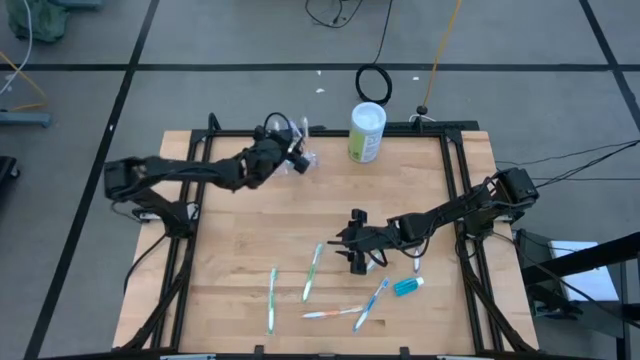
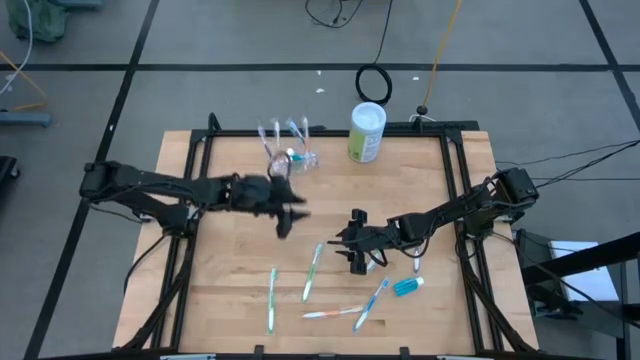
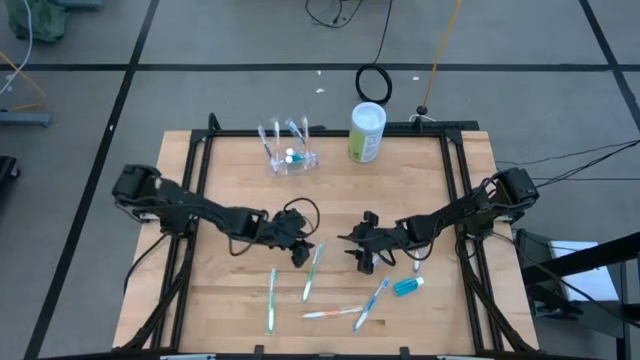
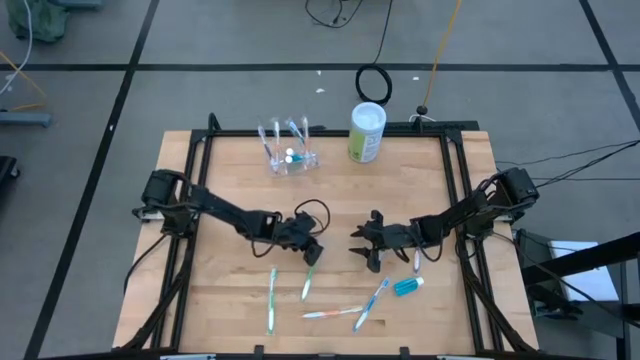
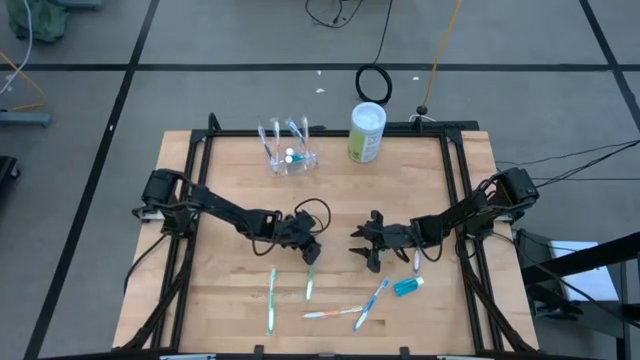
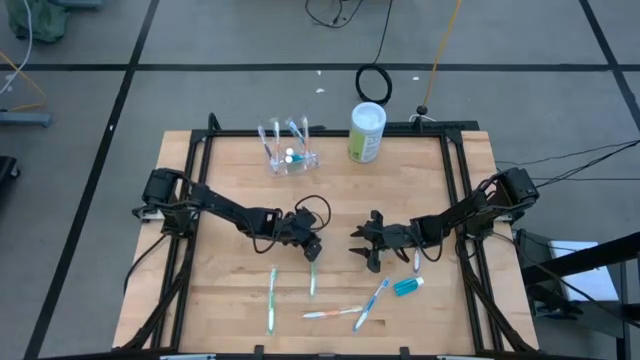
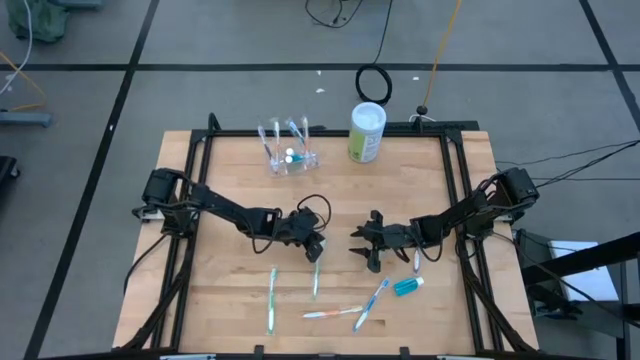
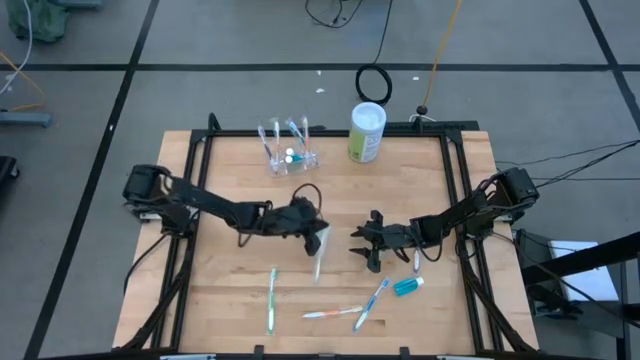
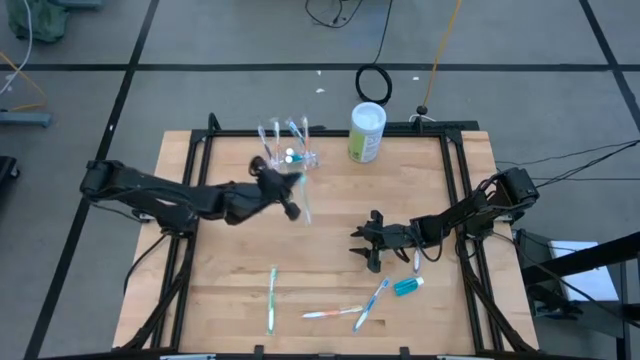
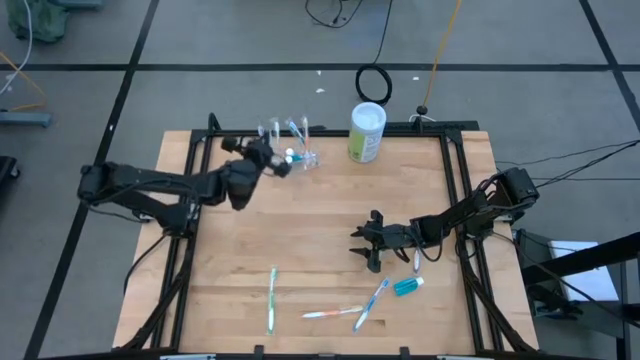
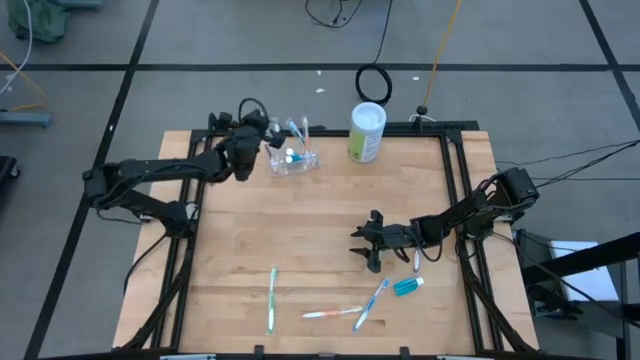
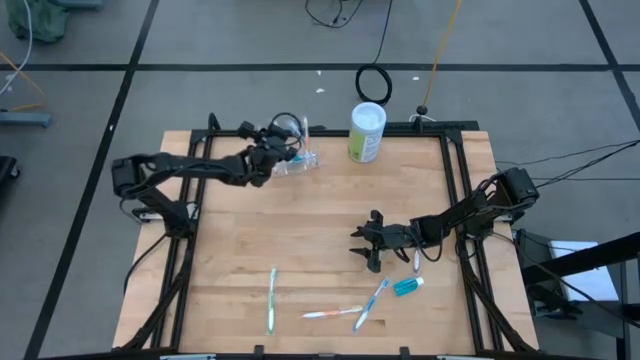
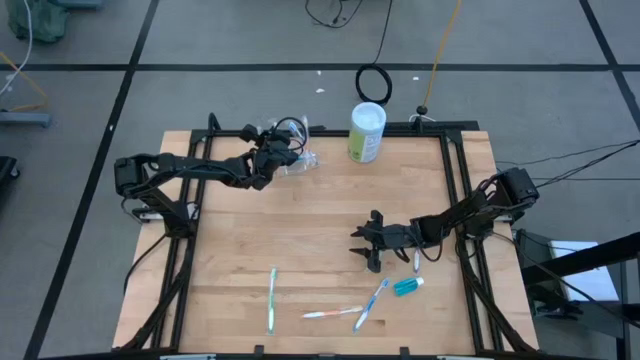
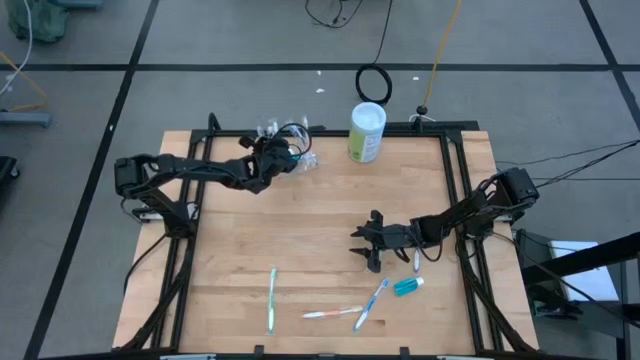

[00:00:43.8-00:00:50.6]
Task: Pick & Place toothbrushing station
Put the middle green toothbrush into the transparent organizer

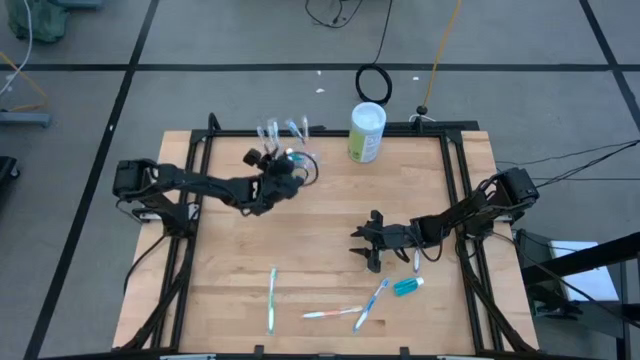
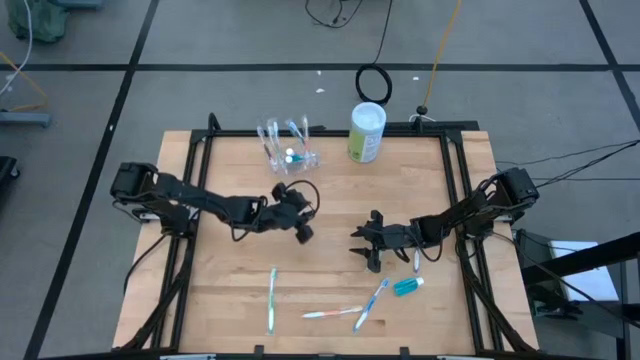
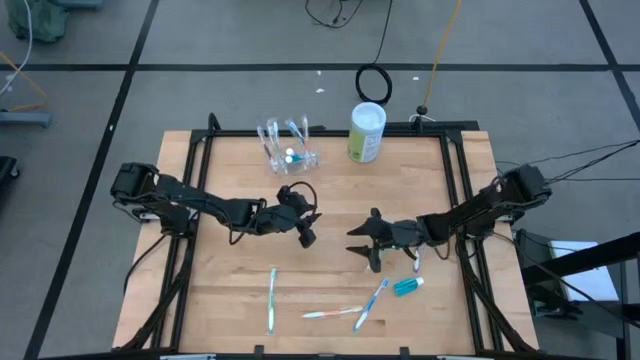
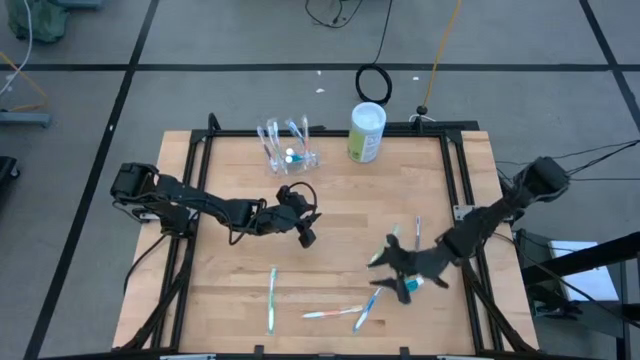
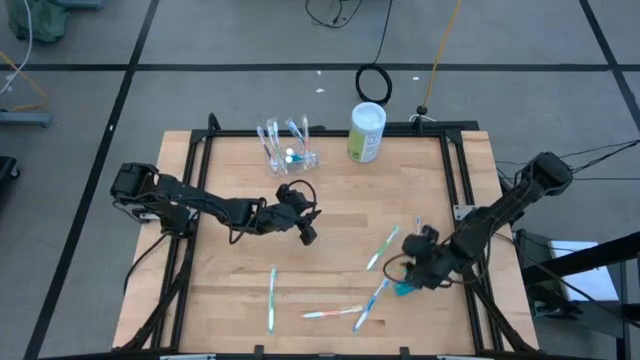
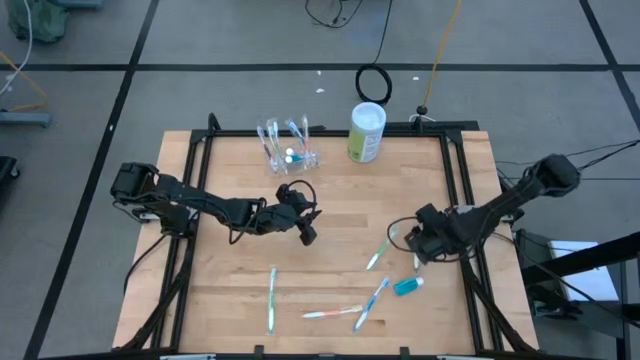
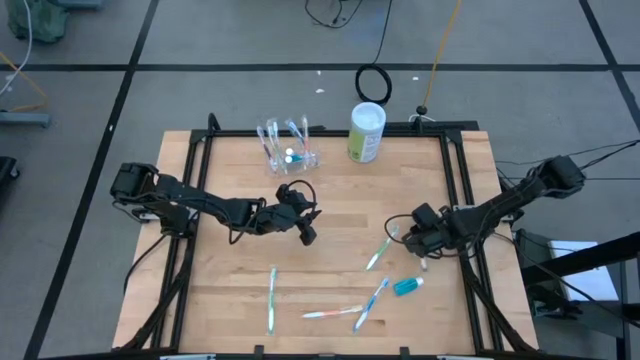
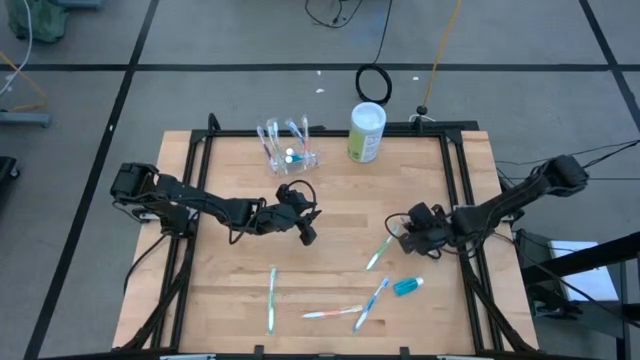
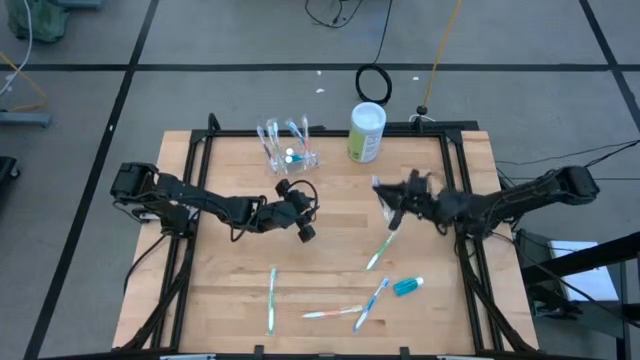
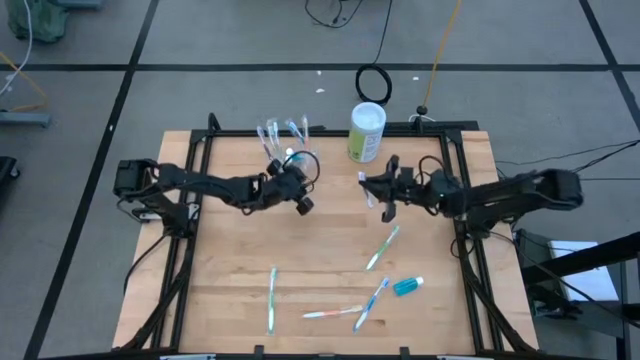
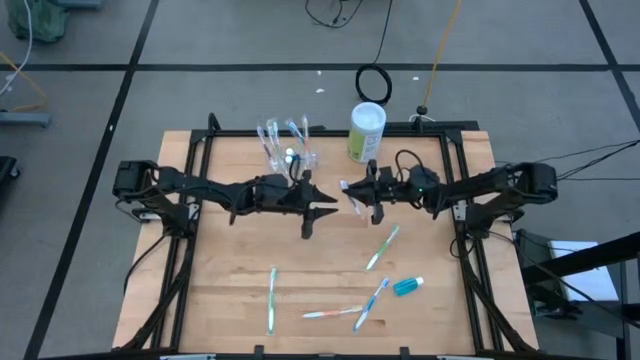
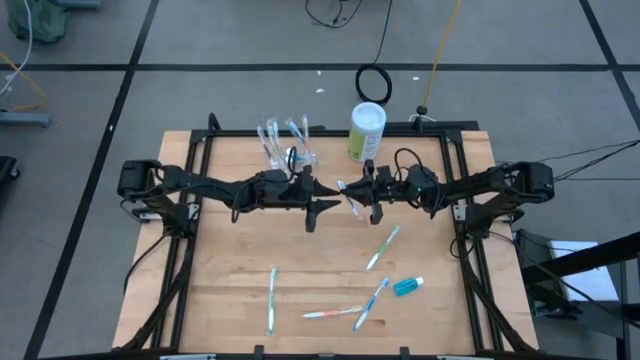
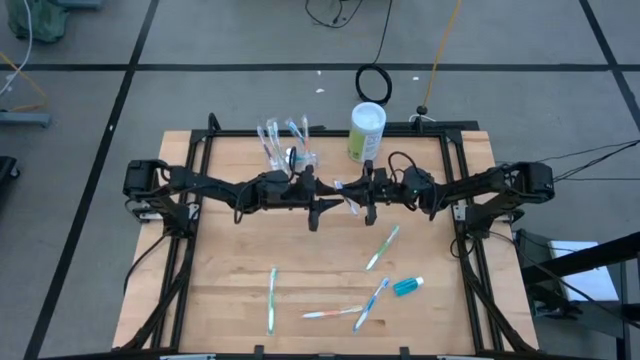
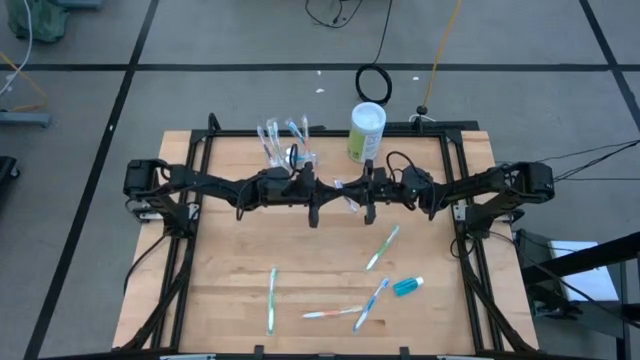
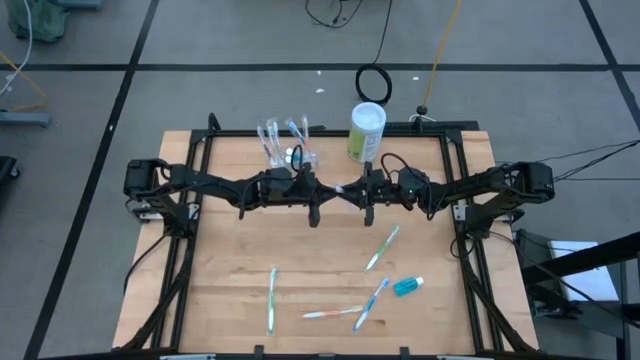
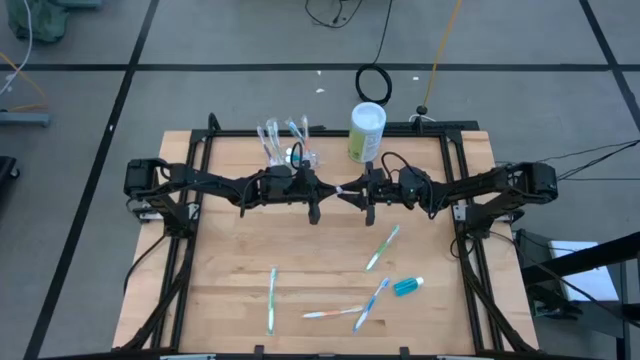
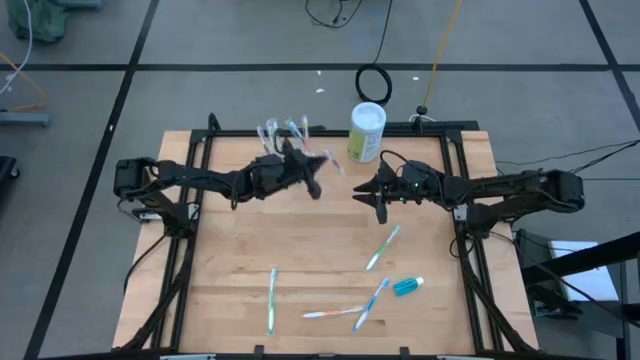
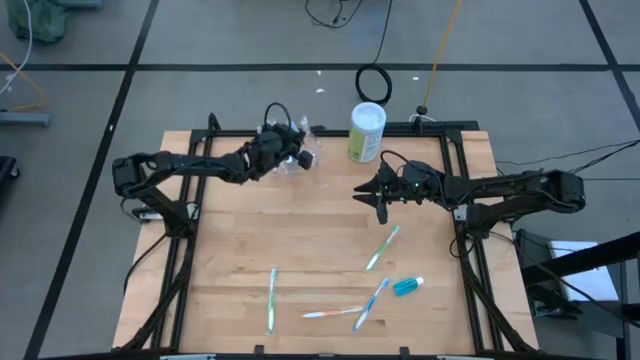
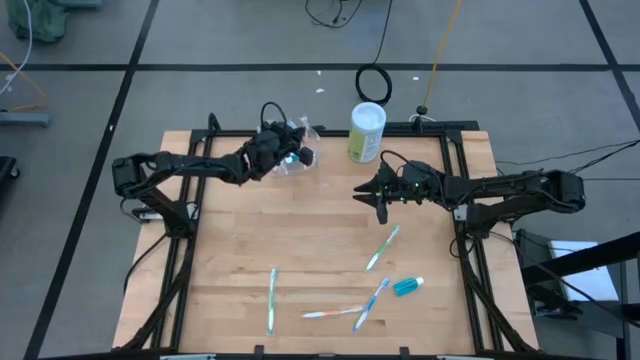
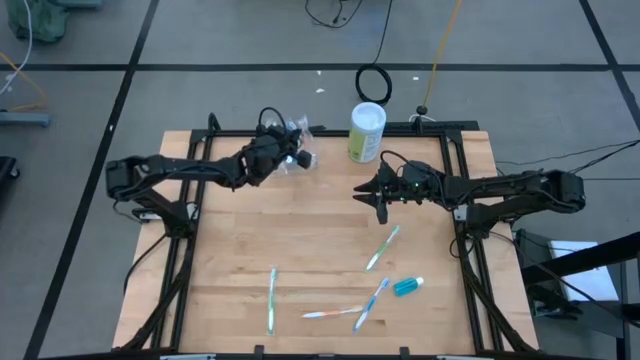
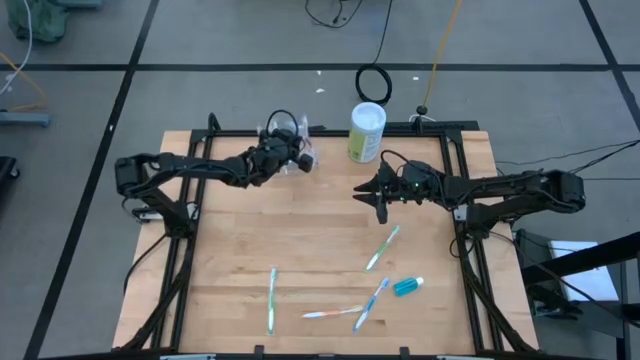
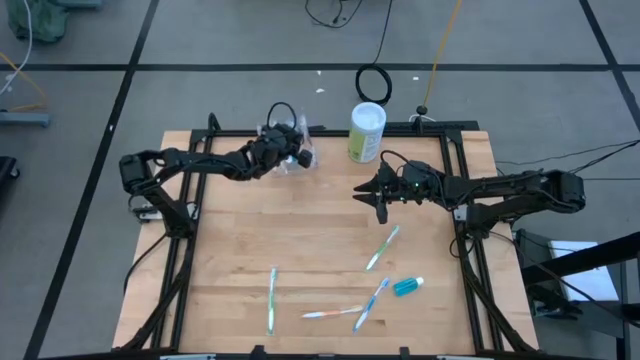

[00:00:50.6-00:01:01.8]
Put the purple toothbrush into the transparent organizer

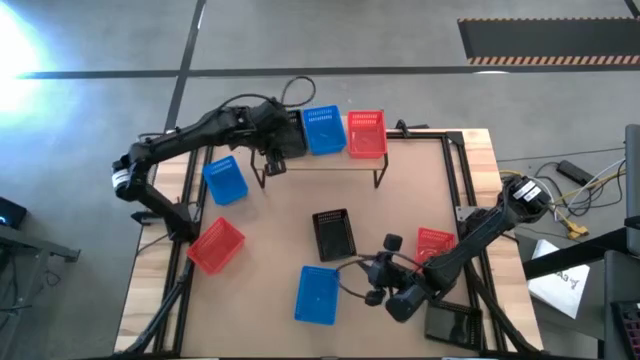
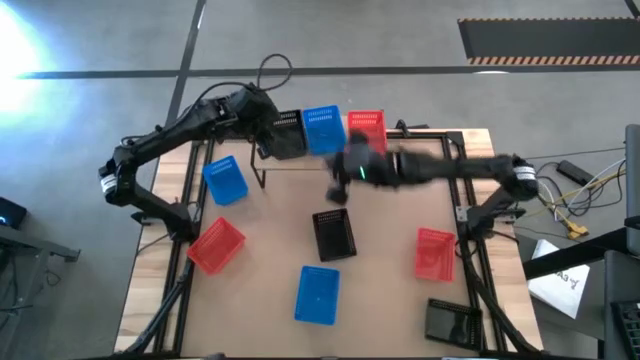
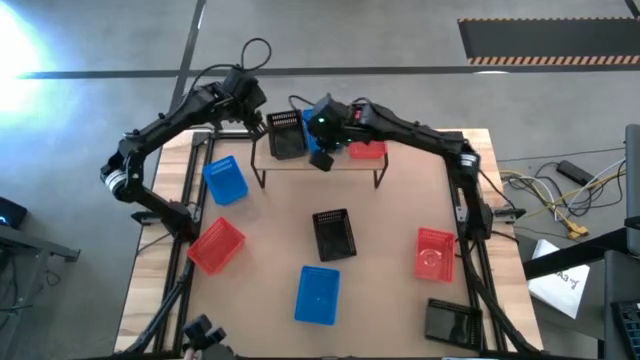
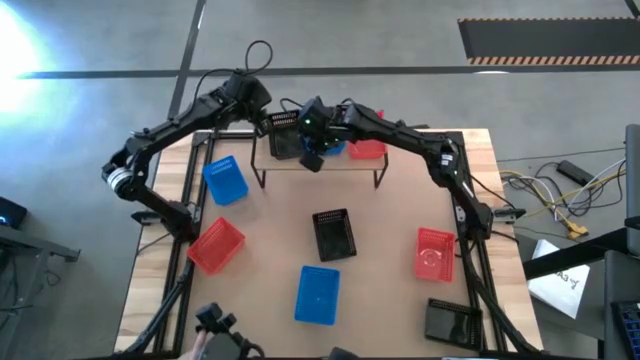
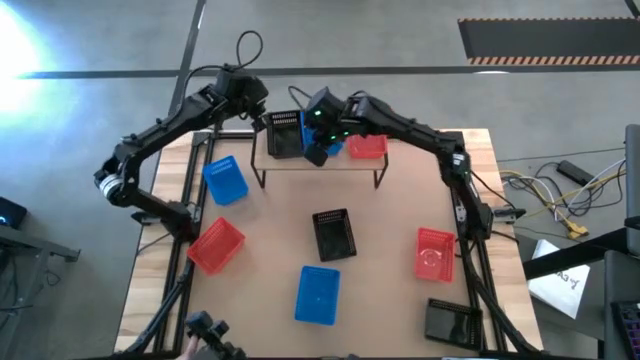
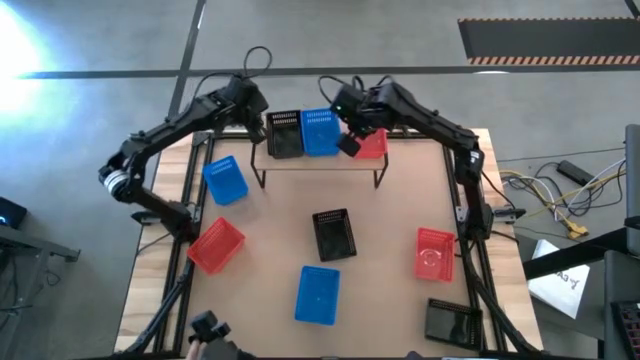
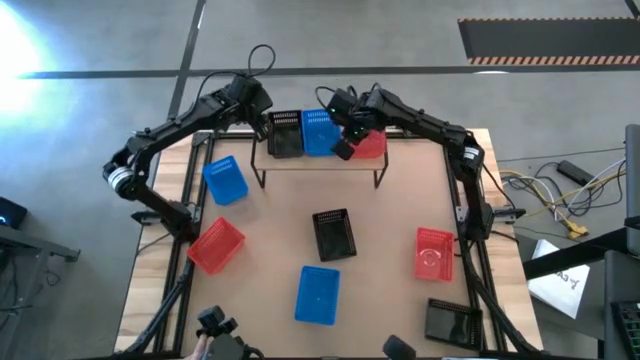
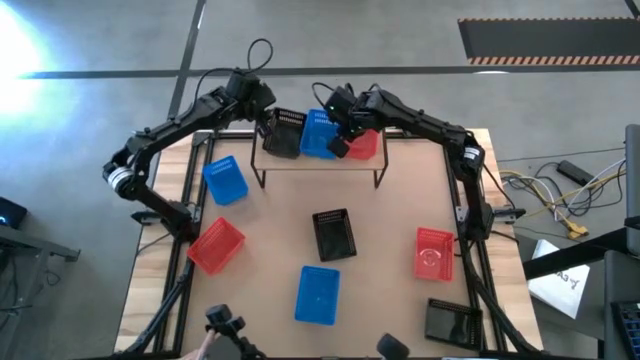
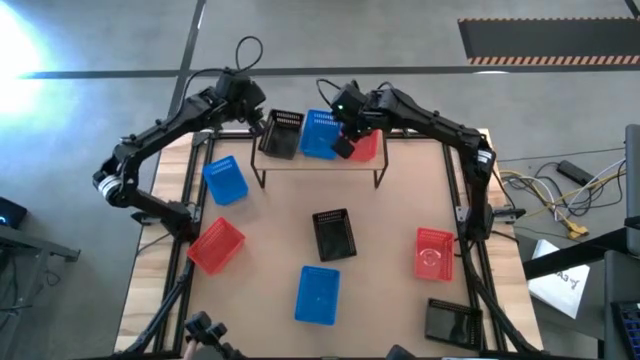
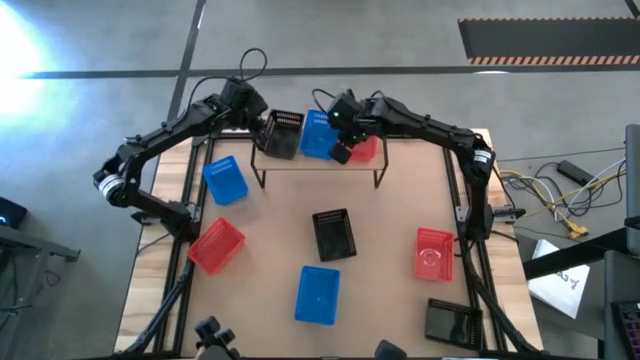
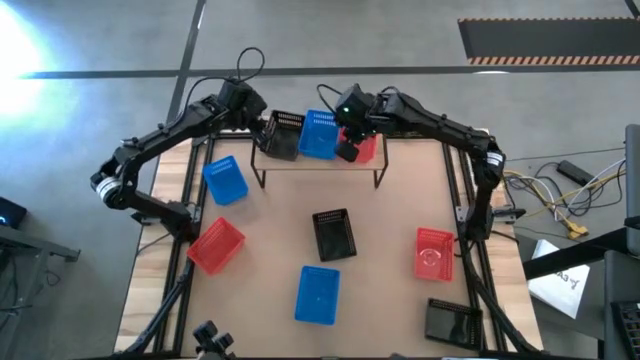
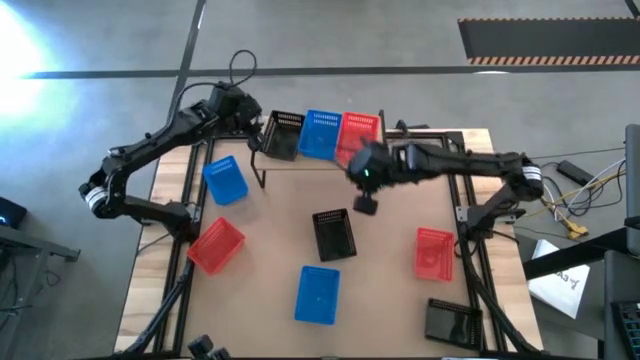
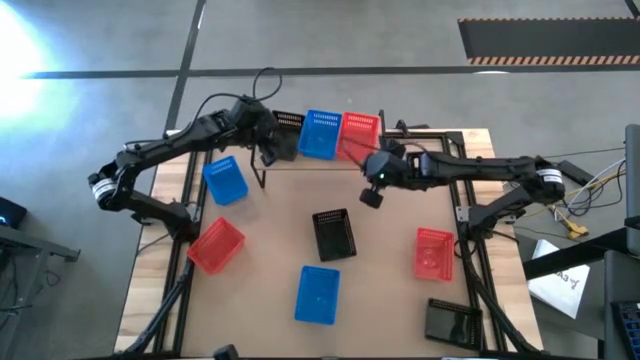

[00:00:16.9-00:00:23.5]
Task: Stack baskets on shelf by color
Adjust the bins
